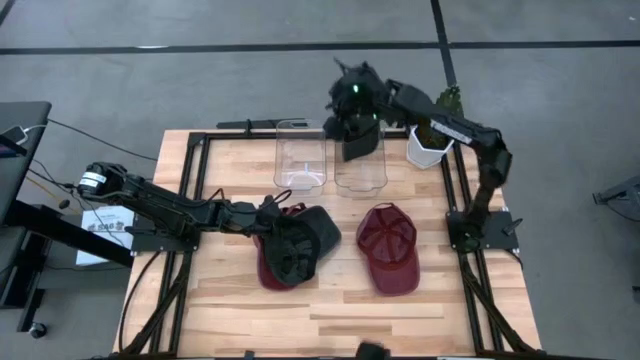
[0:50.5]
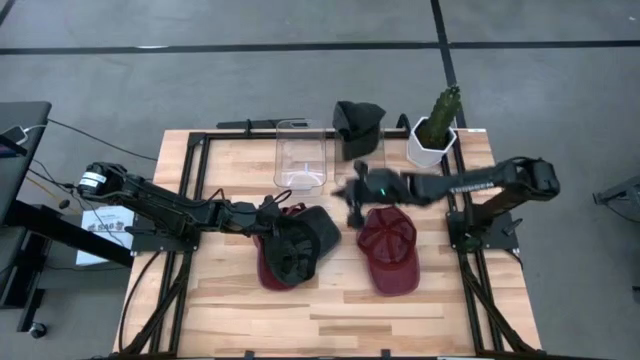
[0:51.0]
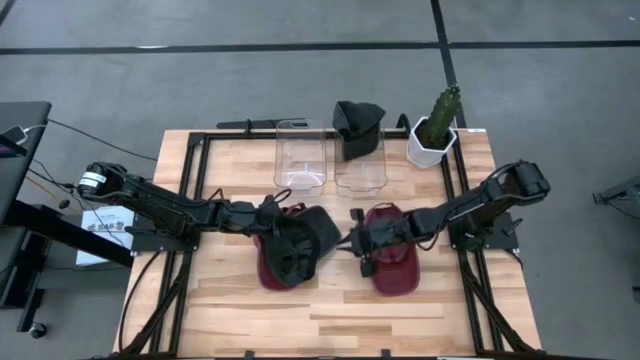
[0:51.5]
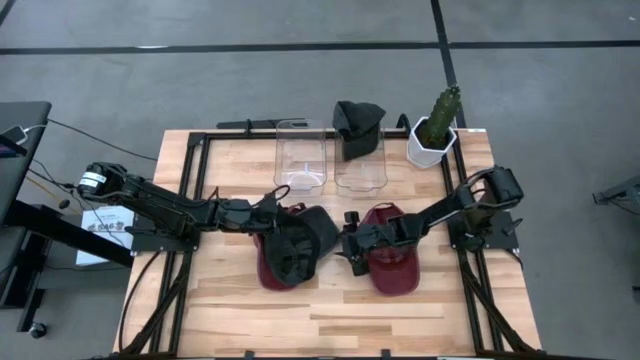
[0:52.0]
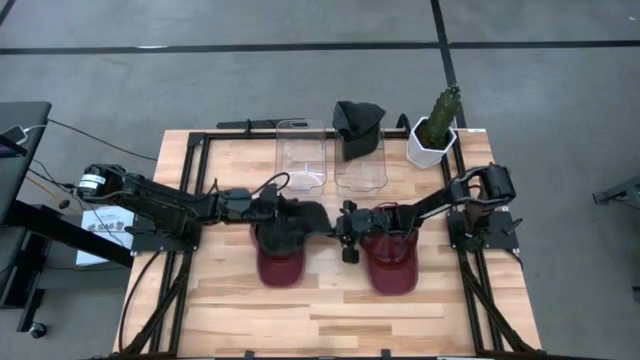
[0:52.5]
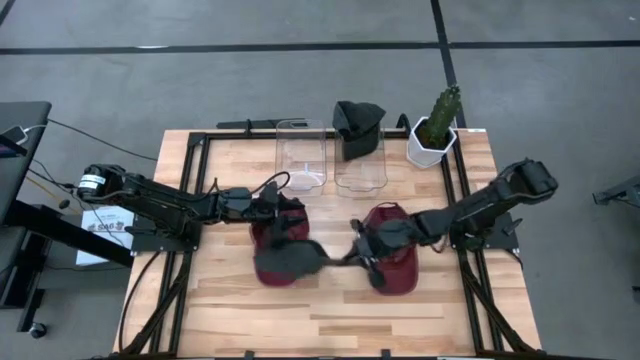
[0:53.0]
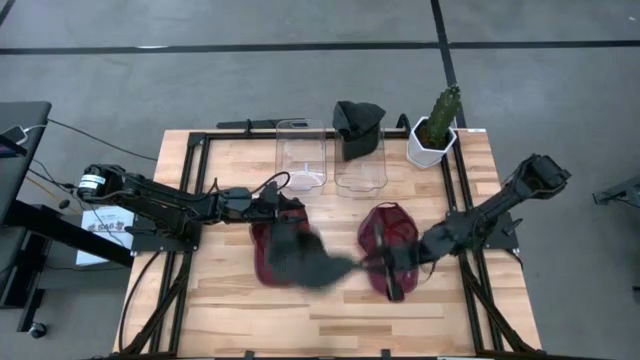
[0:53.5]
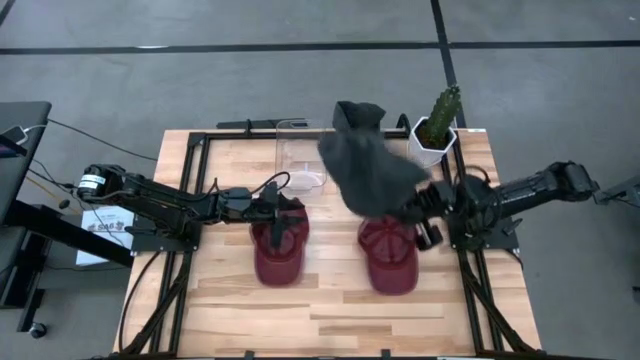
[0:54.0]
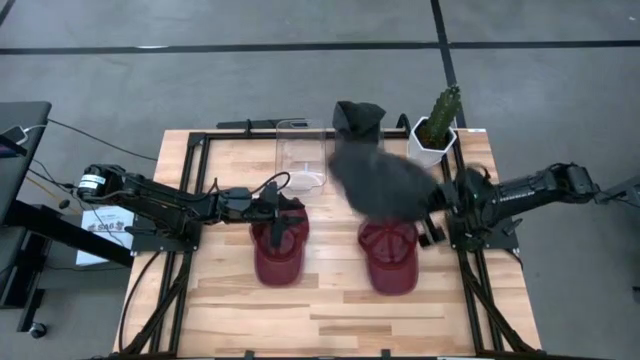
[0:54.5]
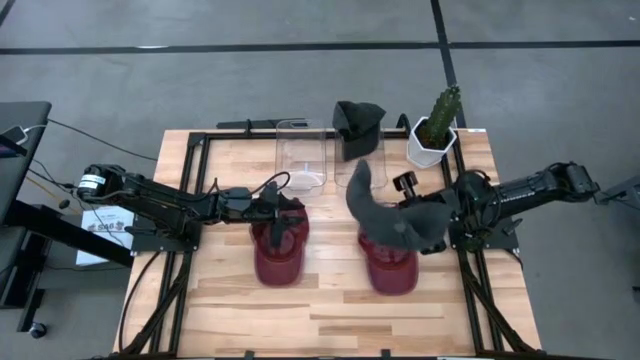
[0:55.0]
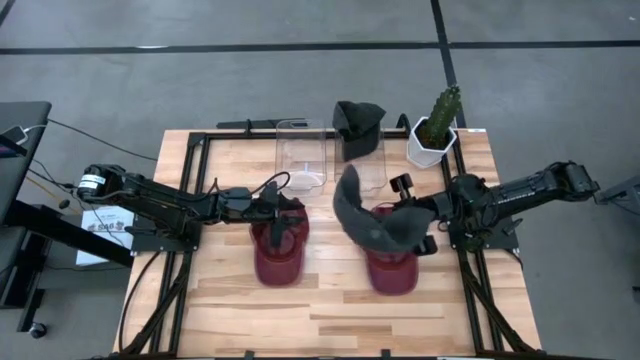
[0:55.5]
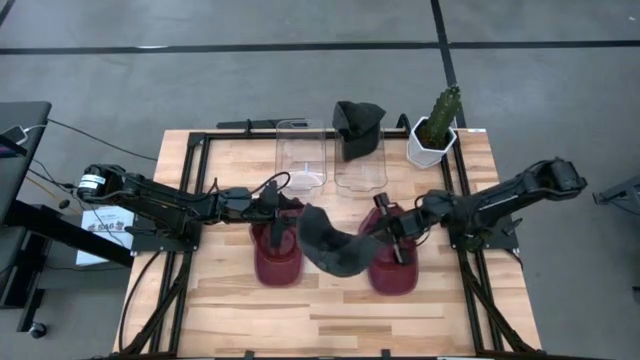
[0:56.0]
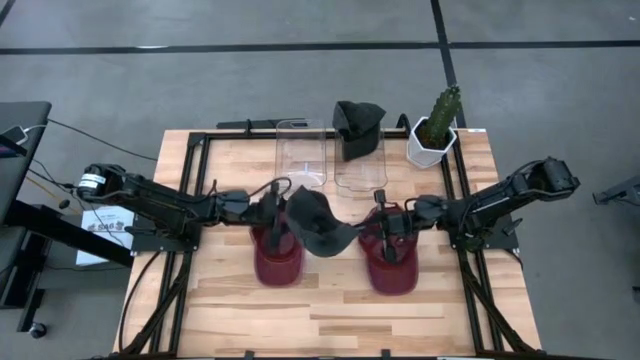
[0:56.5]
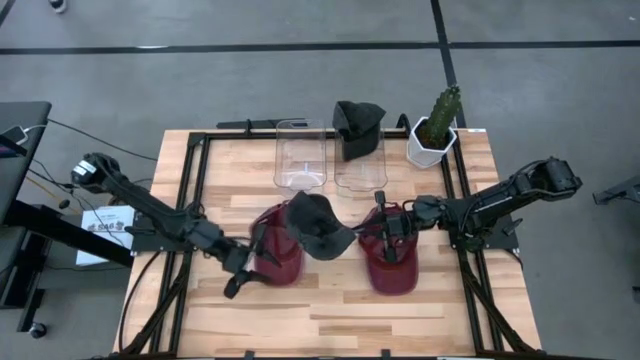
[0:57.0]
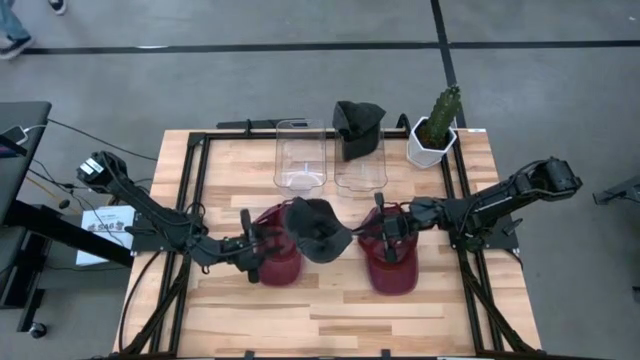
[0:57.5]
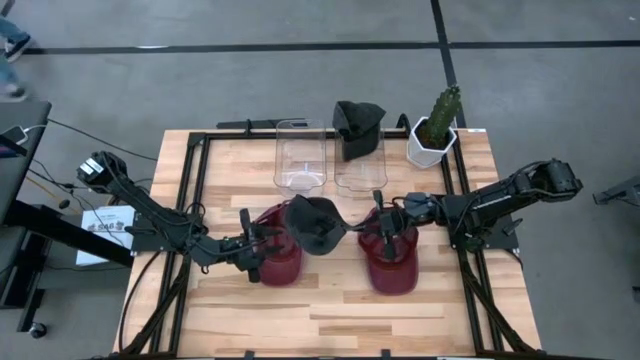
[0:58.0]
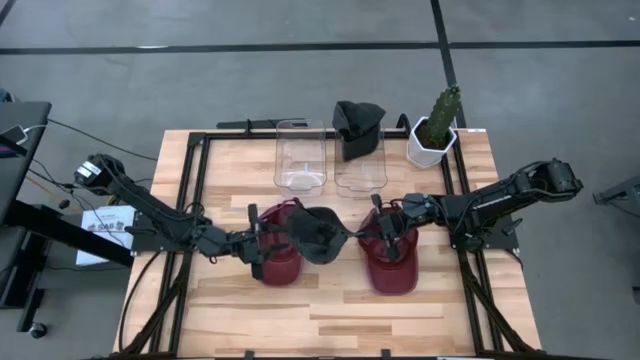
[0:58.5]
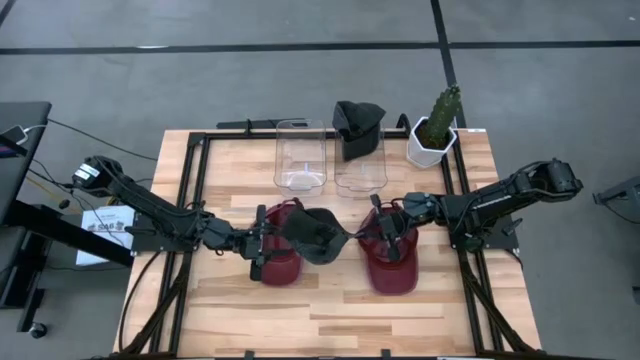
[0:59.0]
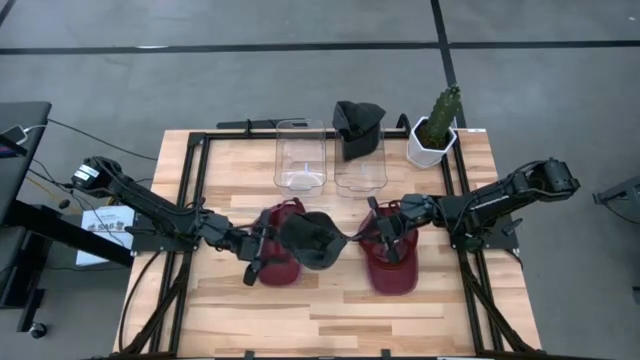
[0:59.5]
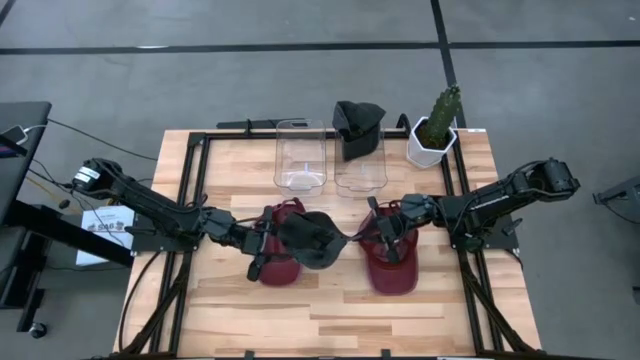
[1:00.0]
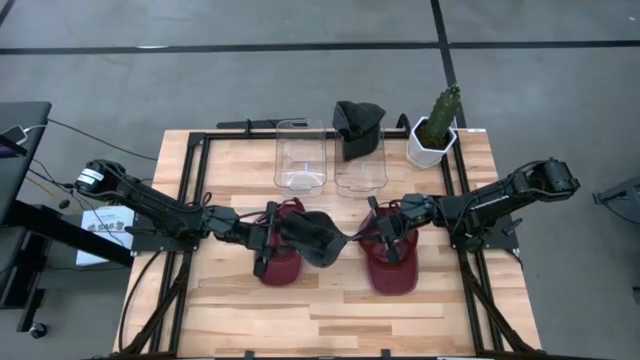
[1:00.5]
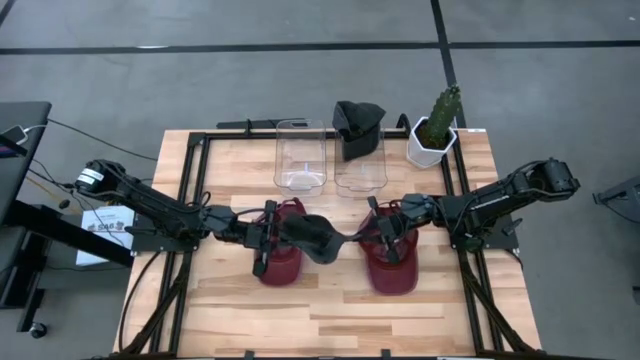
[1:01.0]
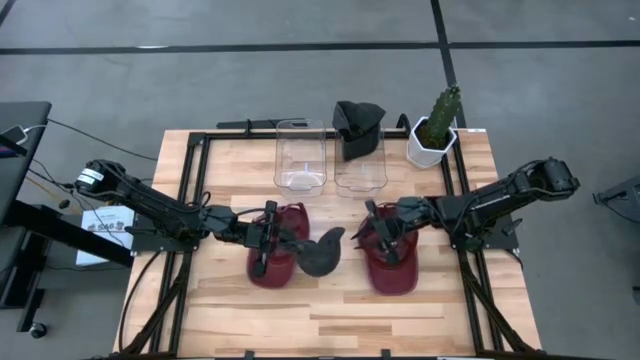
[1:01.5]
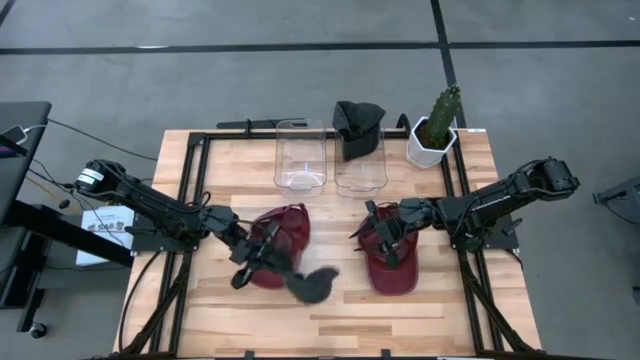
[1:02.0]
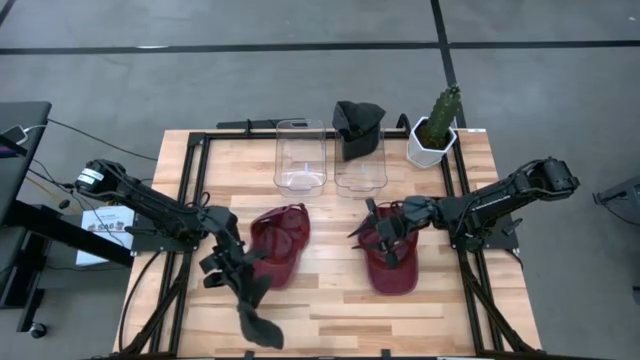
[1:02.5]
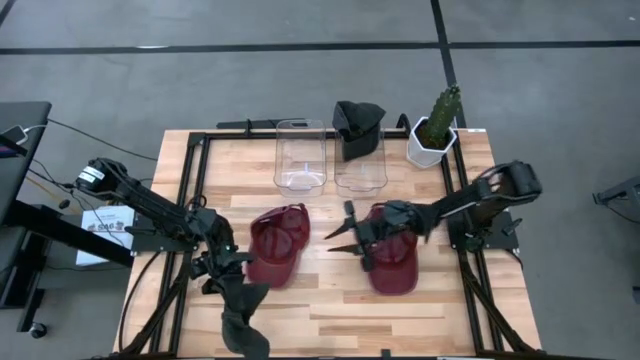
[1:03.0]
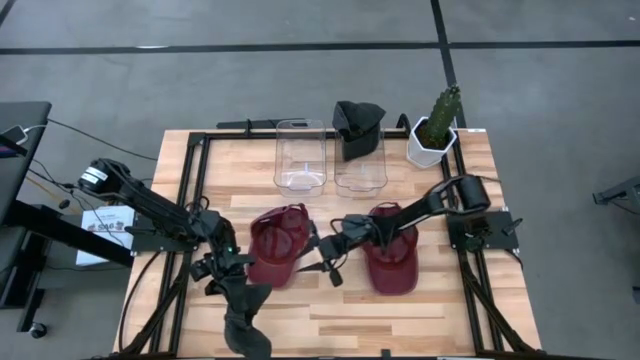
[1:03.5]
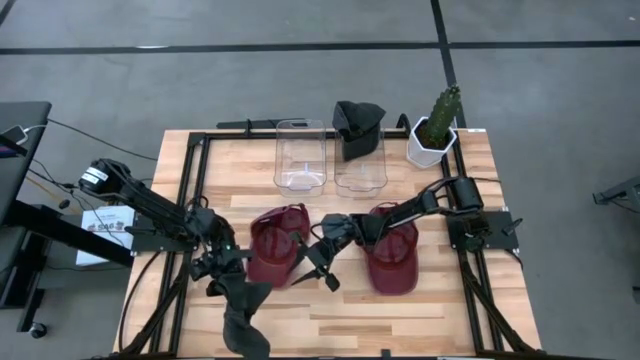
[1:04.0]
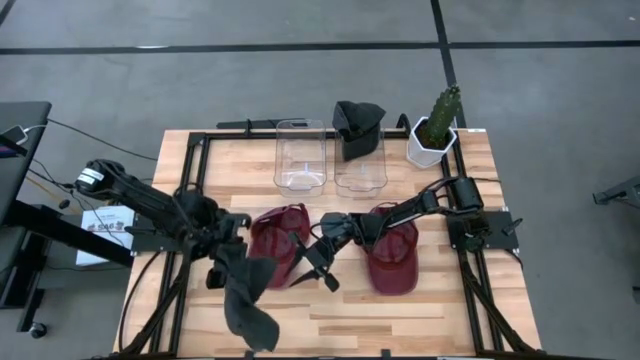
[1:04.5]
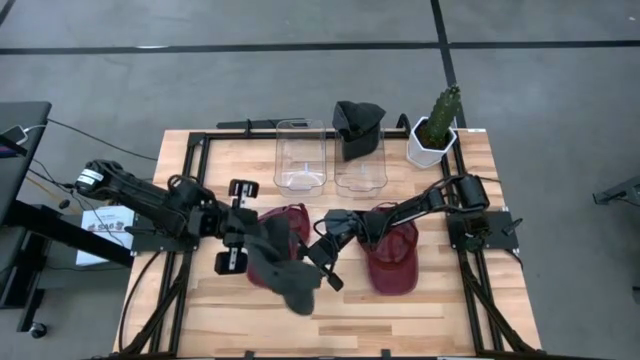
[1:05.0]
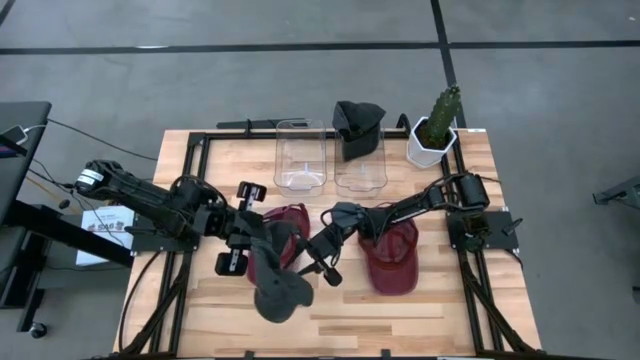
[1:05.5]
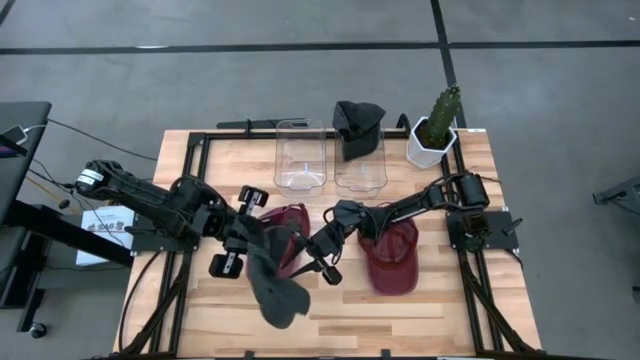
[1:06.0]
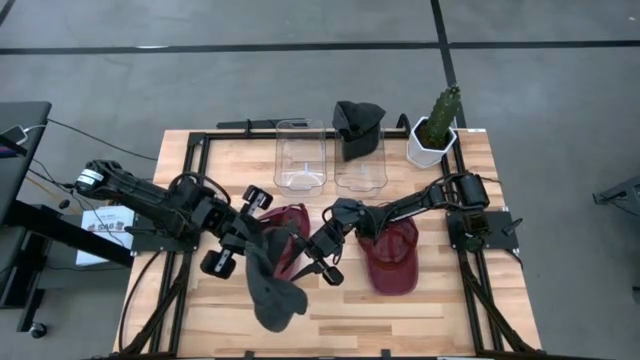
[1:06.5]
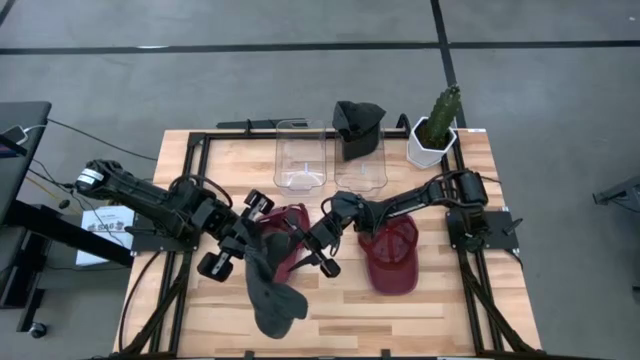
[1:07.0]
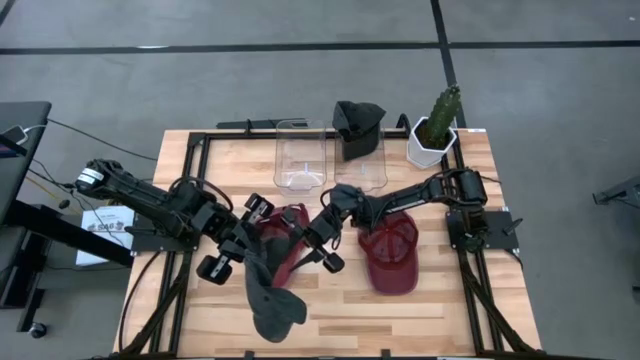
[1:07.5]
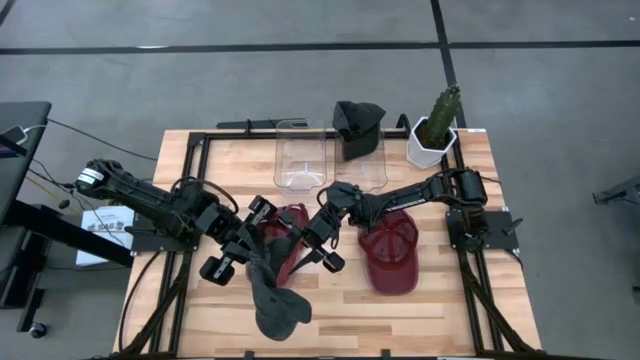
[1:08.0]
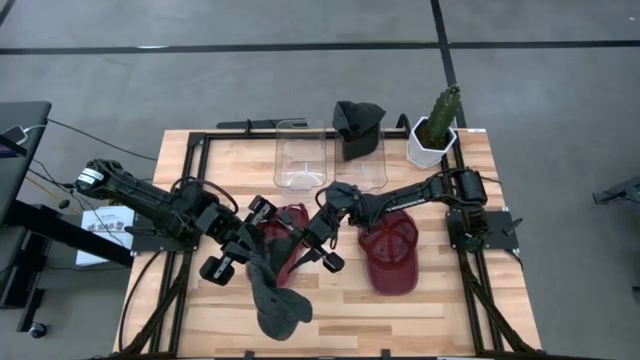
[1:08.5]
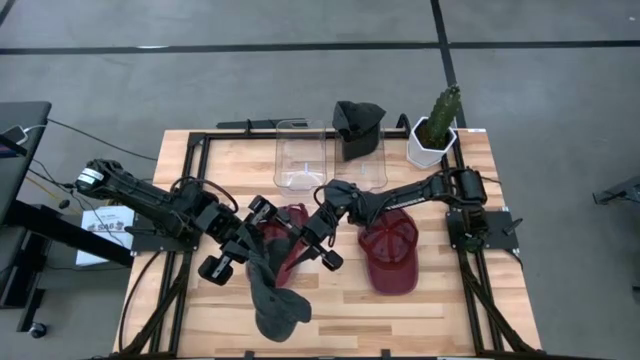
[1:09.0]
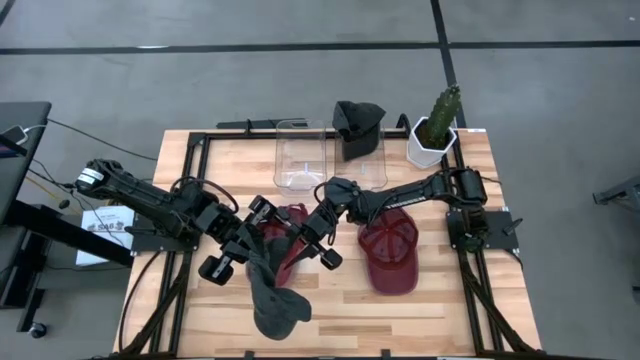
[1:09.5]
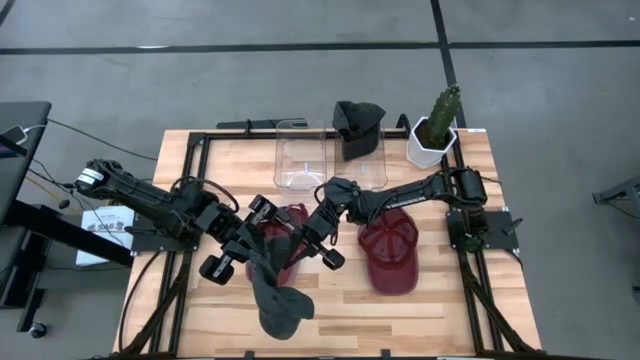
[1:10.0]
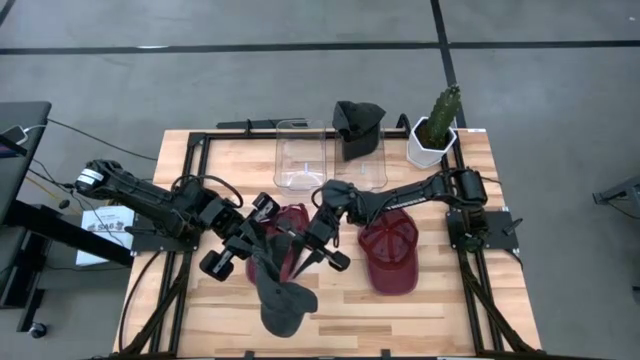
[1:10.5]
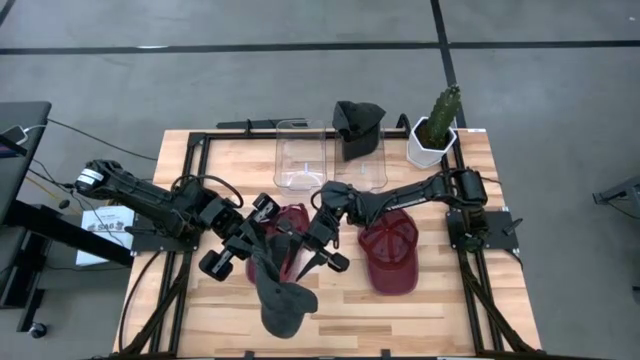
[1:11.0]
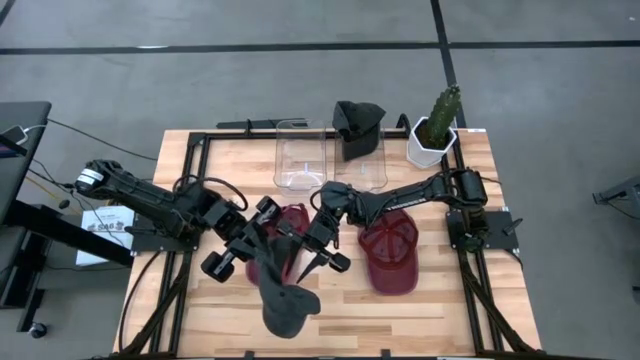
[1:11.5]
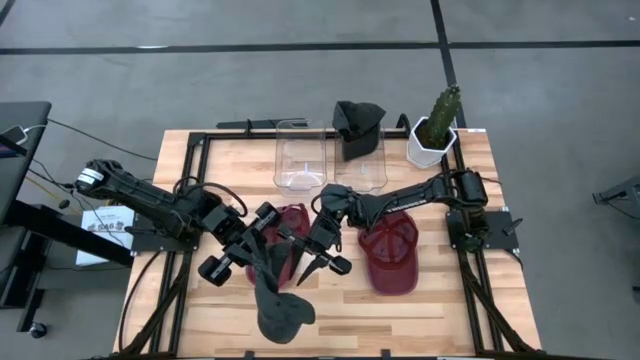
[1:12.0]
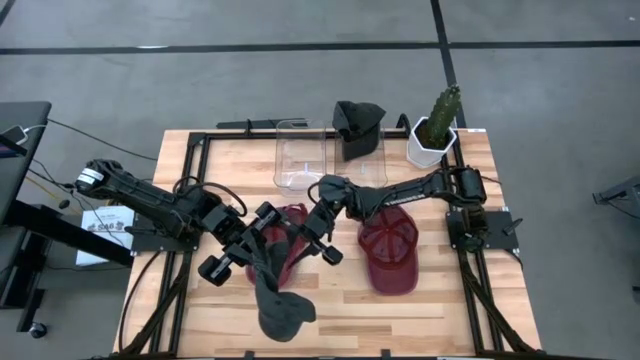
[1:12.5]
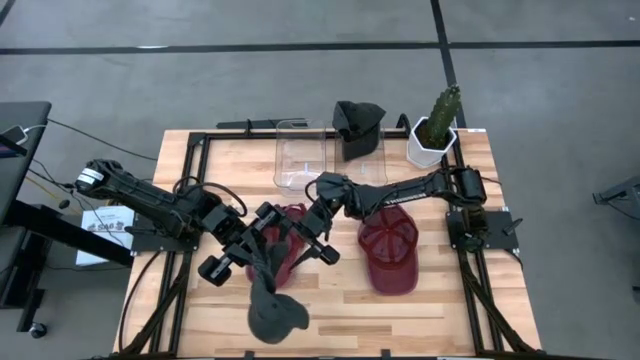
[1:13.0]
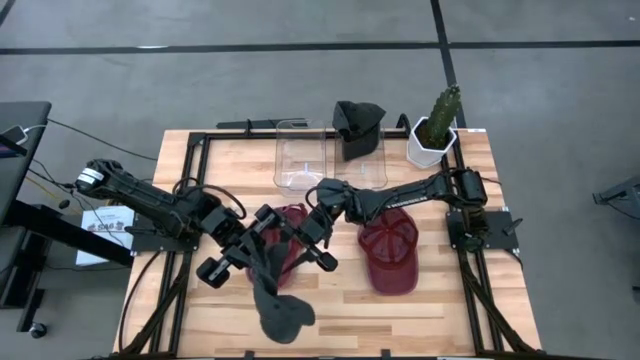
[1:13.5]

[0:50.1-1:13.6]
Task: Pick & Place hat
Put the black cap into the right transparent bin
